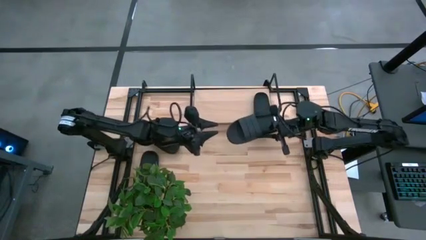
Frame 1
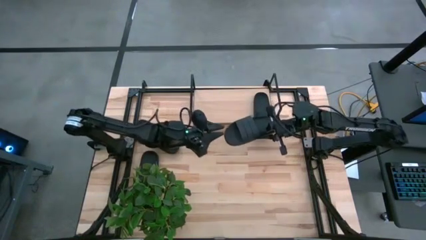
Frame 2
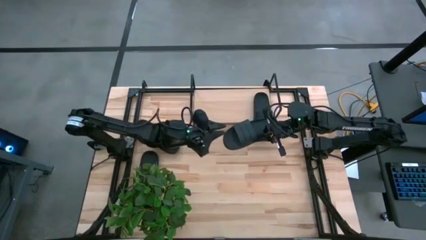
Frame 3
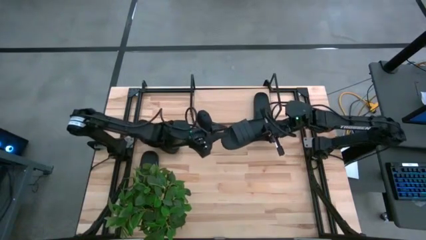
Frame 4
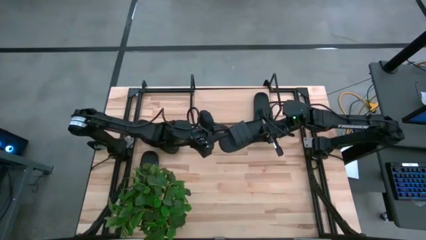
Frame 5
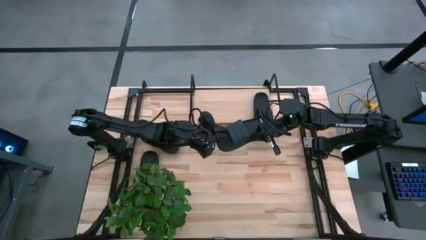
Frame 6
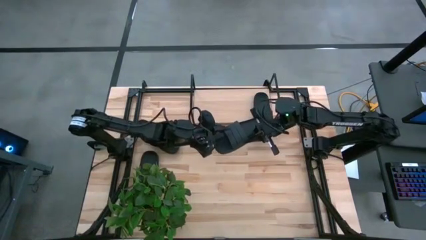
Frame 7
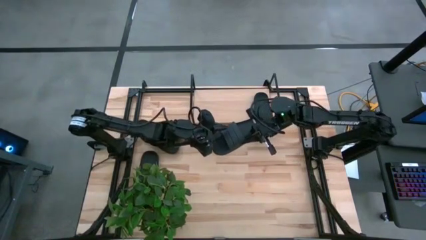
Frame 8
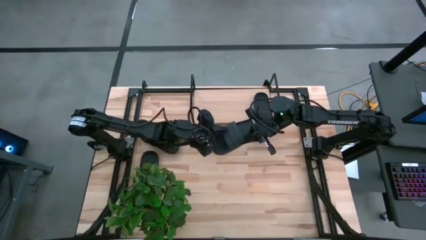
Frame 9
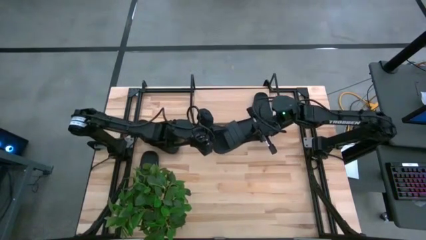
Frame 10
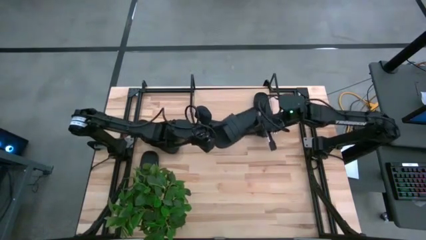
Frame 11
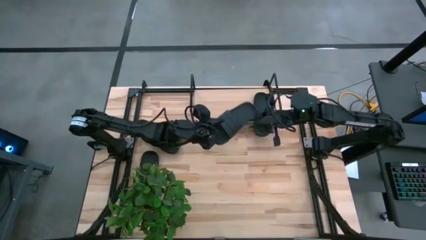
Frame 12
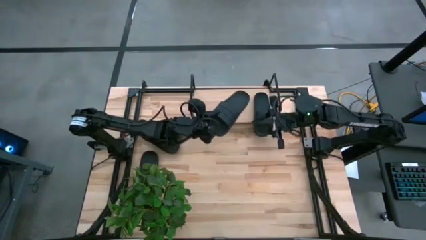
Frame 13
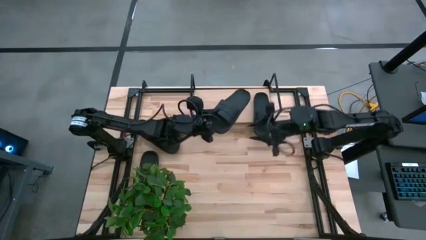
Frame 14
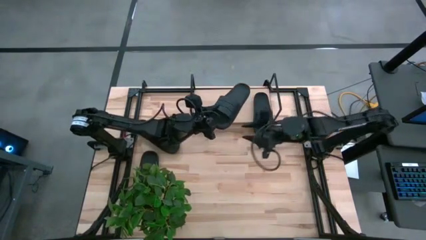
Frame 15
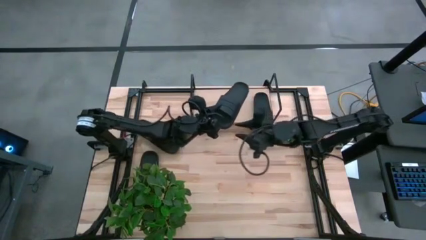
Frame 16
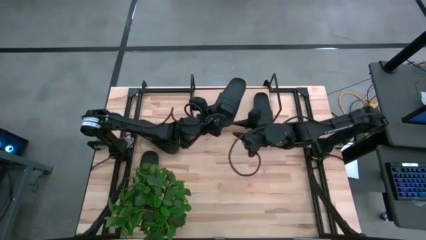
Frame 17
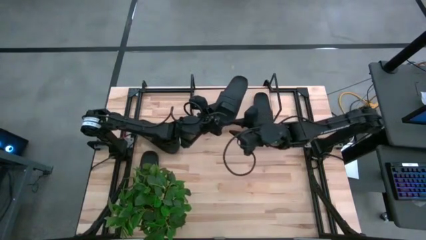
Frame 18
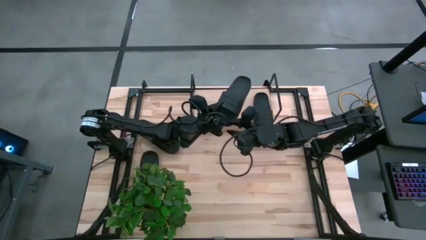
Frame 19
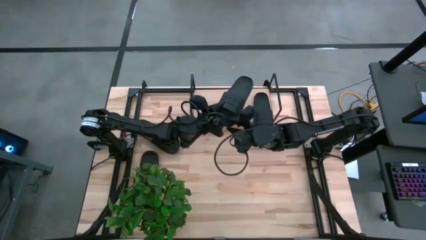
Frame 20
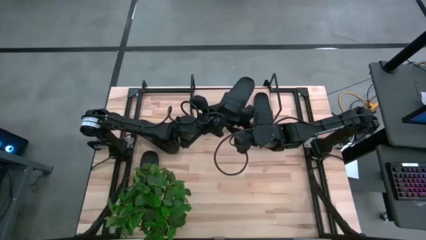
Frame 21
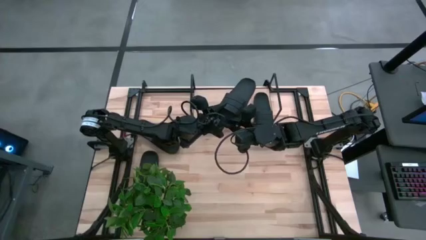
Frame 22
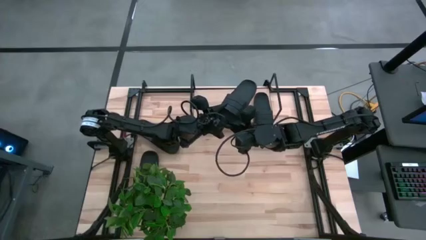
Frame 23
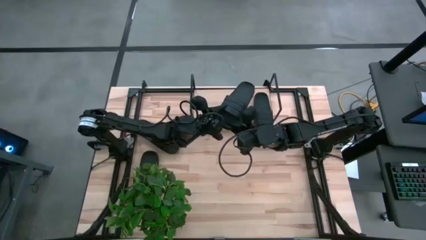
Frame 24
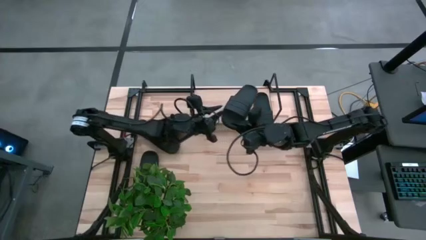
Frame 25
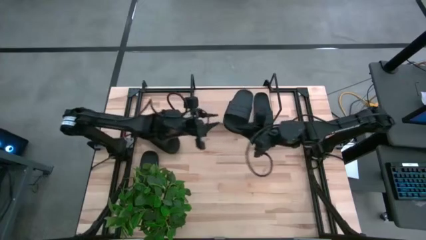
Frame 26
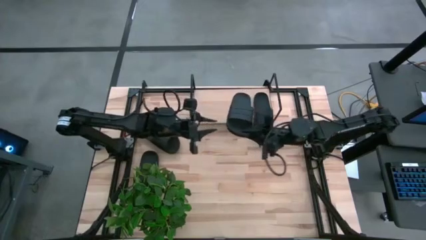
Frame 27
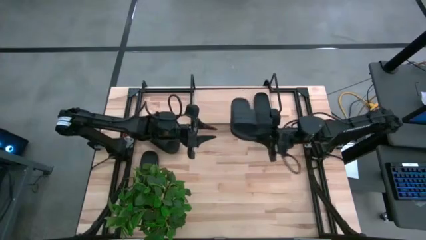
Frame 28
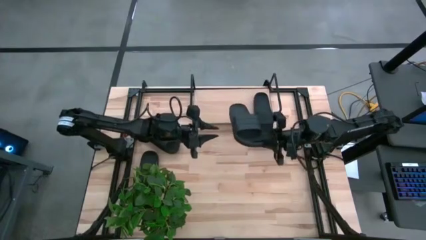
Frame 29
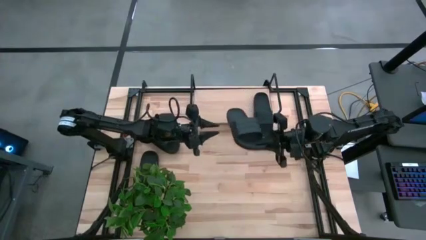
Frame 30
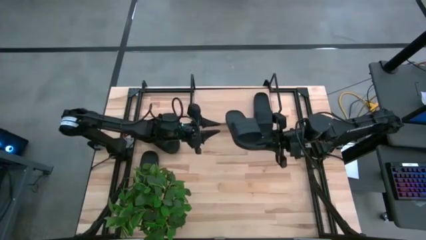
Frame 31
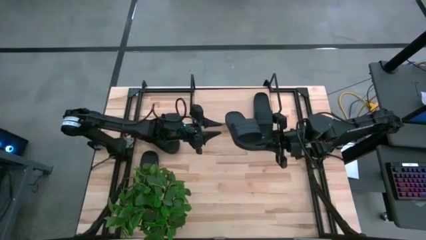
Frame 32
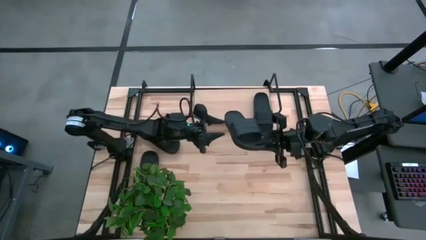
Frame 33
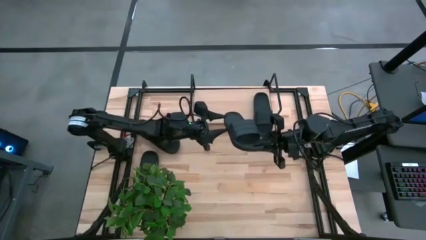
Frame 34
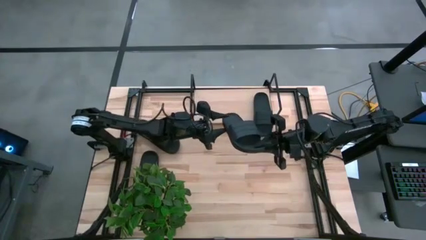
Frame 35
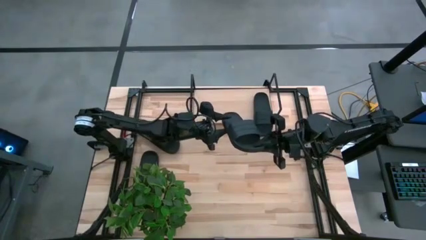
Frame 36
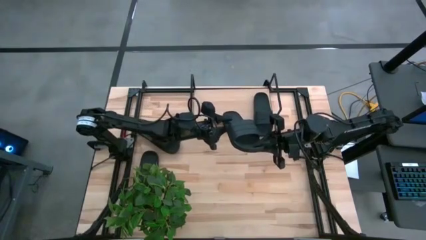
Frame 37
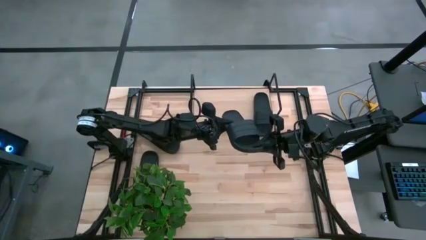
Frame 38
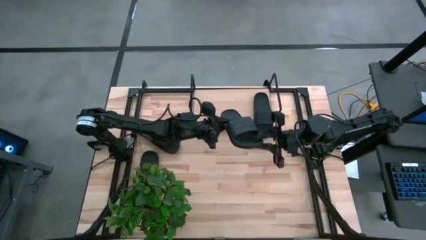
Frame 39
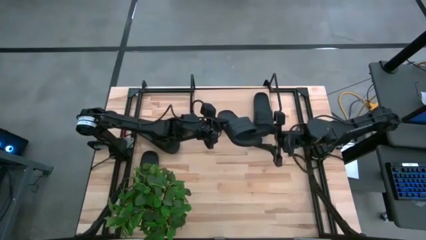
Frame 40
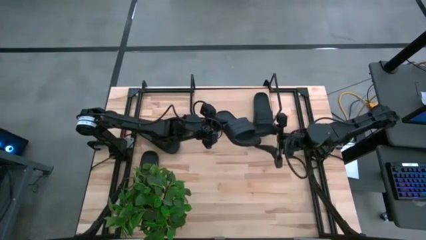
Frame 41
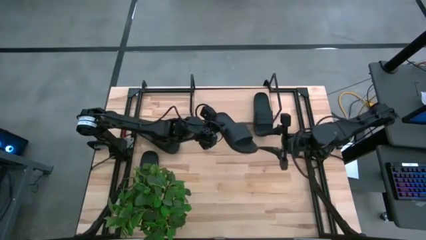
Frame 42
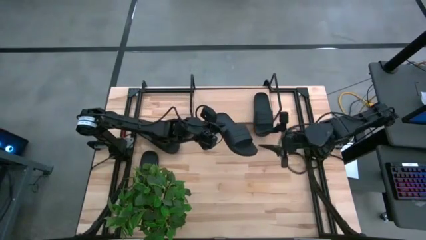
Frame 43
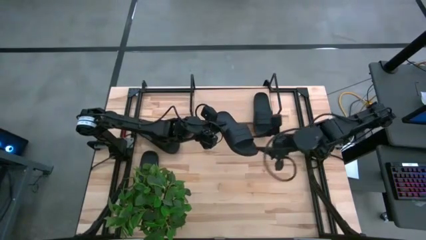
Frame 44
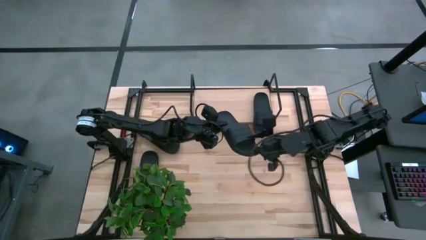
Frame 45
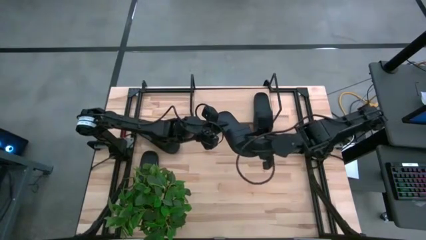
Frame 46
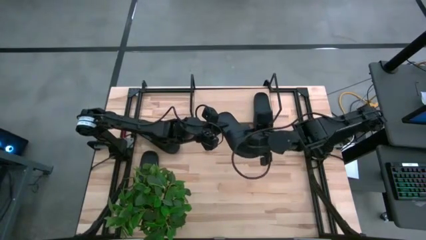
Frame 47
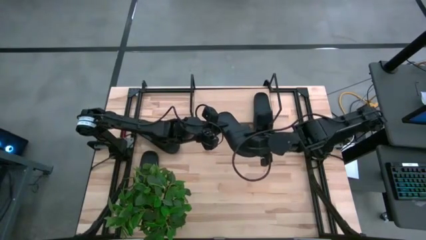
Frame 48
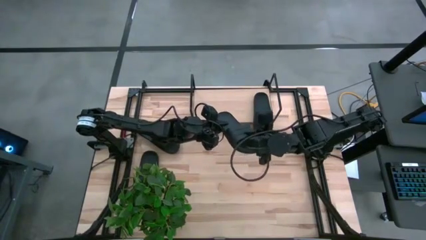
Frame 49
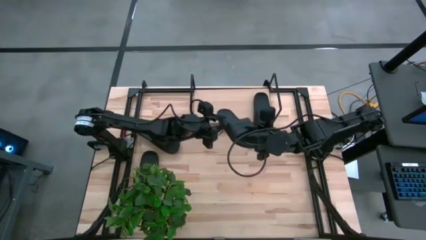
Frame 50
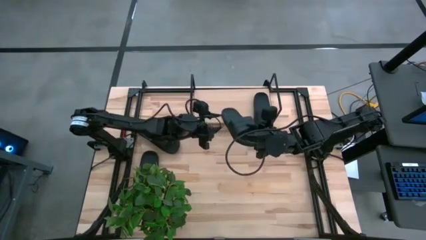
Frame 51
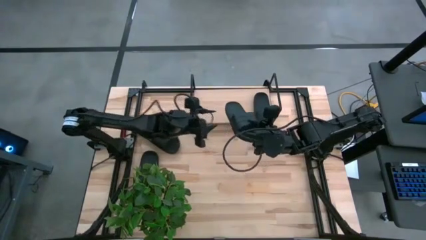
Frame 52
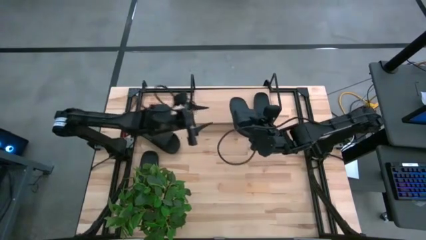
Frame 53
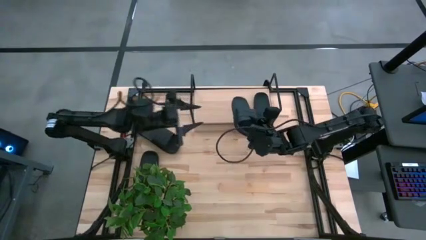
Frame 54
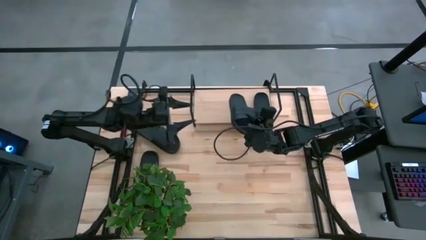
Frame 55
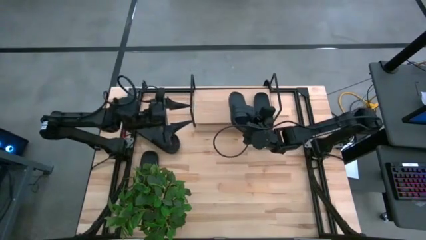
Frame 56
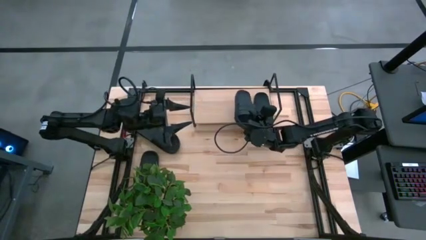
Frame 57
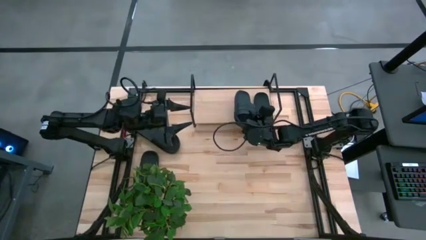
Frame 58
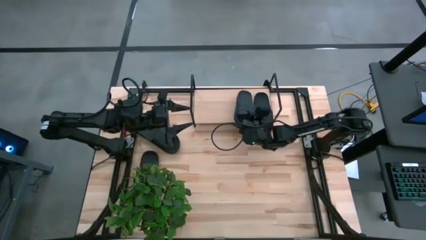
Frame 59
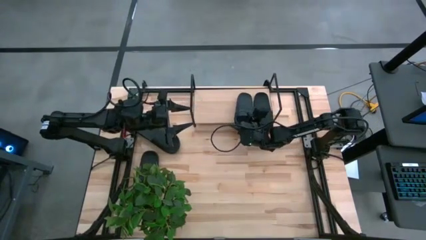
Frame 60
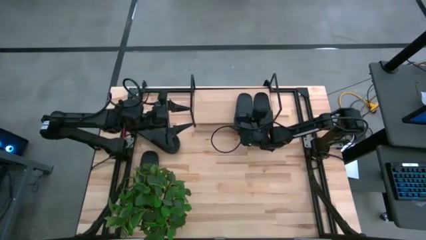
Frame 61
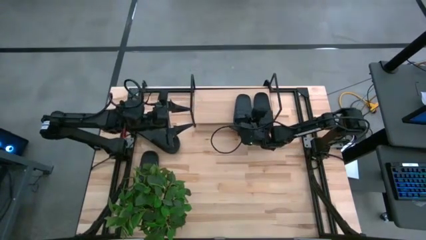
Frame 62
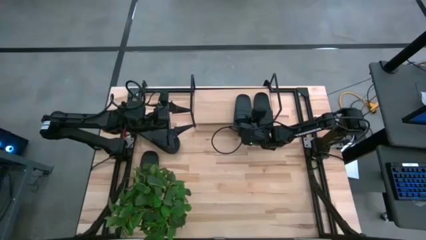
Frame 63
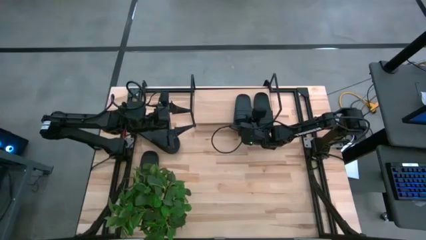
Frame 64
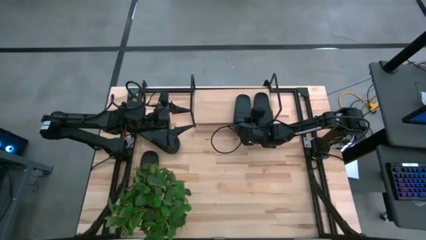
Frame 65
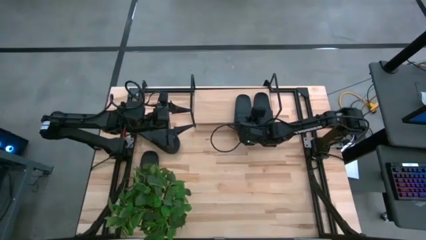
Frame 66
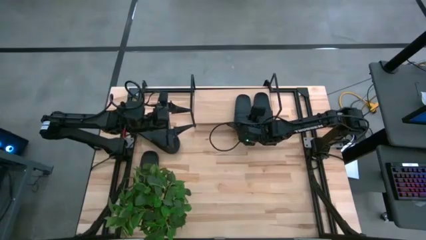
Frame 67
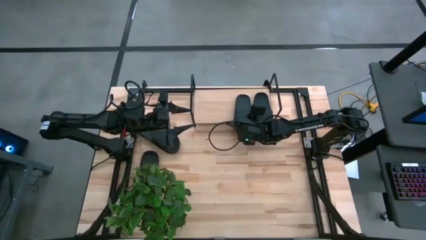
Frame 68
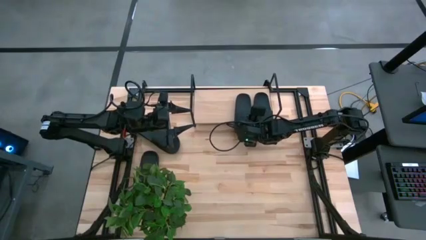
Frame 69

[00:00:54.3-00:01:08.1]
Task: Pick and place slides into the shelf
Put the black slipper on the shelf

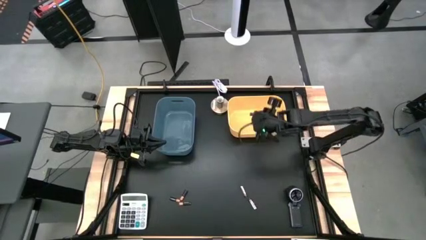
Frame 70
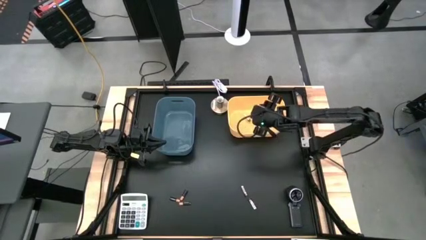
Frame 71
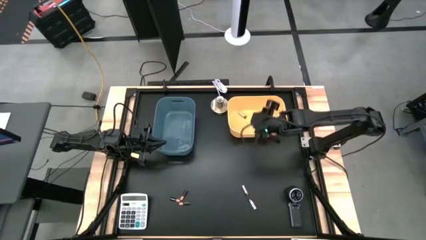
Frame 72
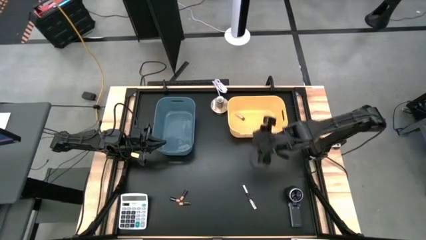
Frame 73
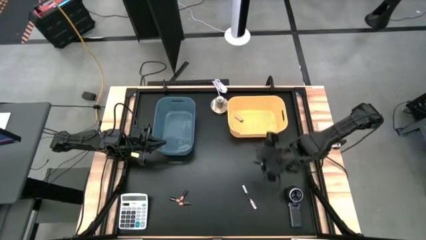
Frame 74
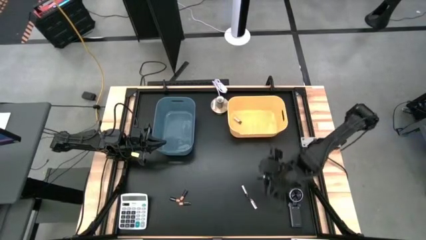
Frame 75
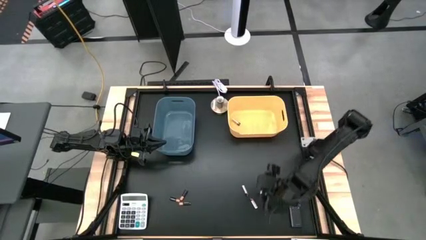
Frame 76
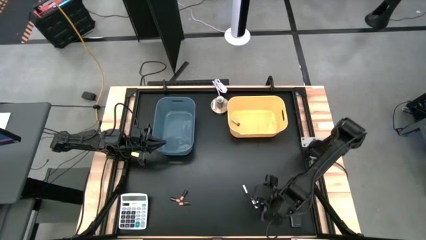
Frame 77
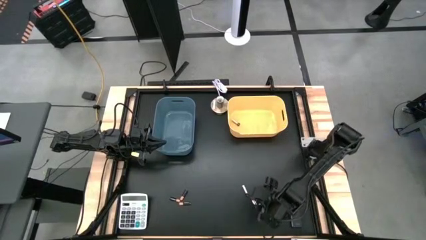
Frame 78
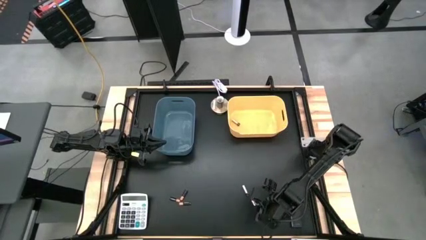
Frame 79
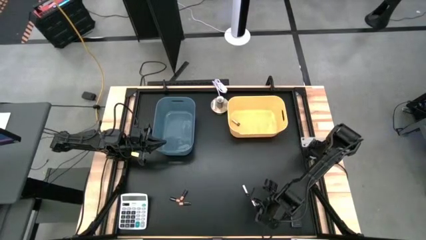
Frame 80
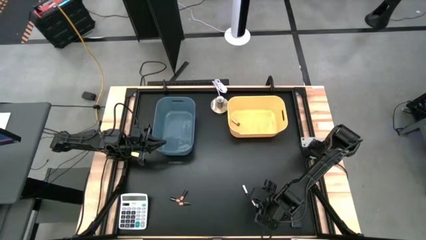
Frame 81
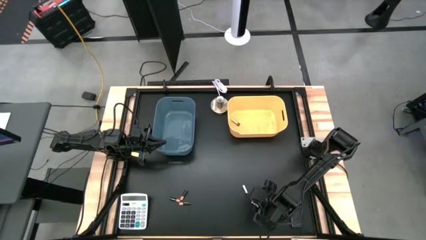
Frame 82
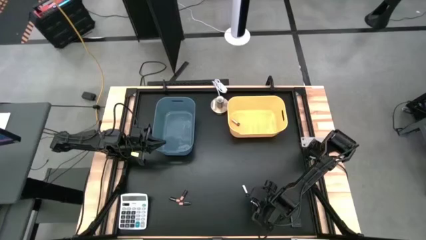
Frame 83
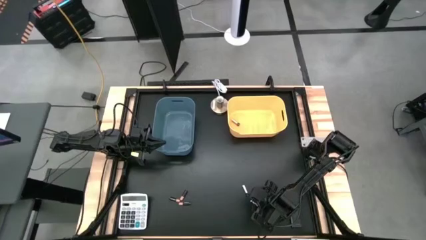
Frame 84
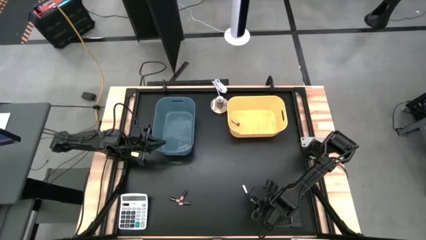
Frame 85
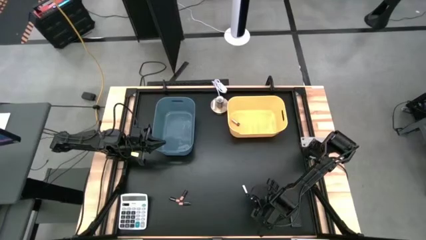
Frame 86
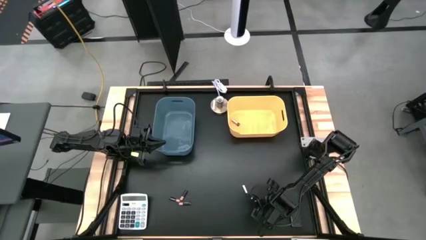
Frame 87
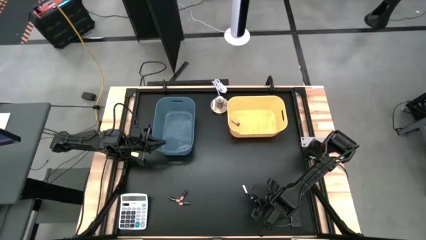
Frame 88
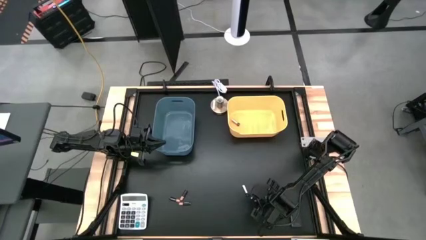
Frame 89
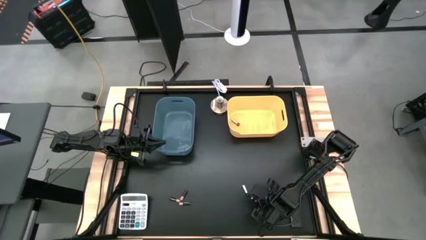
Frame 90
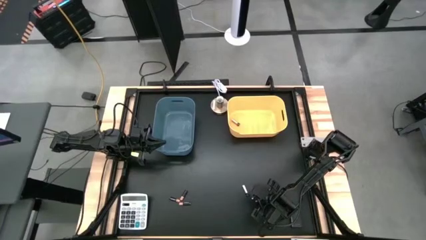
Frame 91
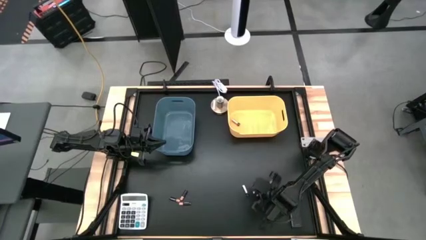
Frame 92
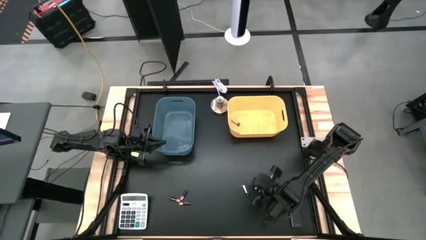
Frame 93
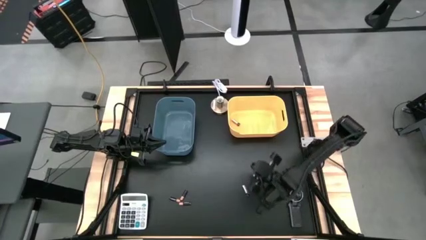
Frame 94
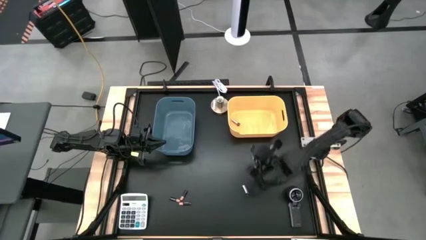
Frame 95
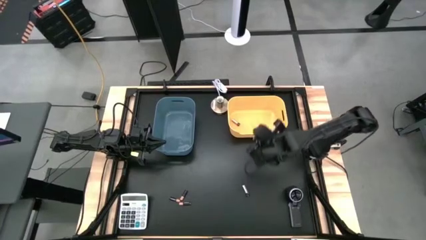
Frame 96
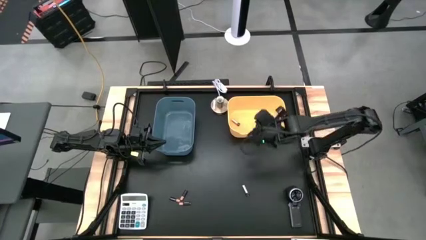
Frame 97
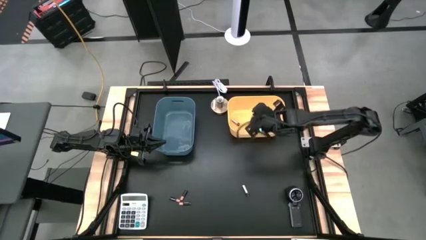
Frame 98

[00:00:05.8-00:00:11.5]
Task: Sort batteries
Put the bottom silver battery into the yellow bin
